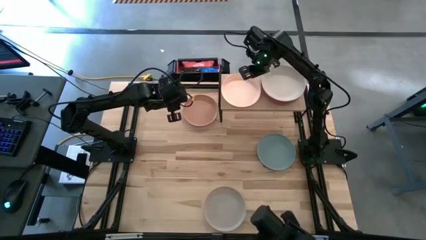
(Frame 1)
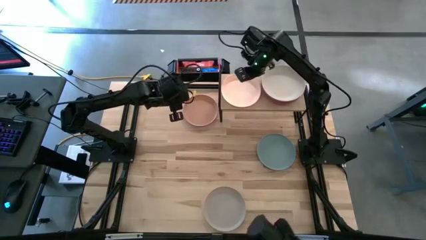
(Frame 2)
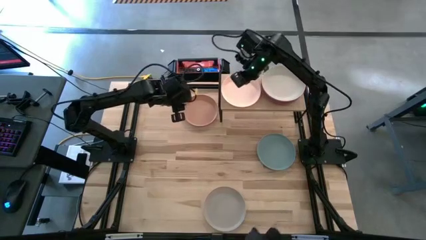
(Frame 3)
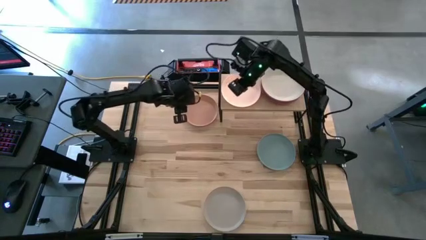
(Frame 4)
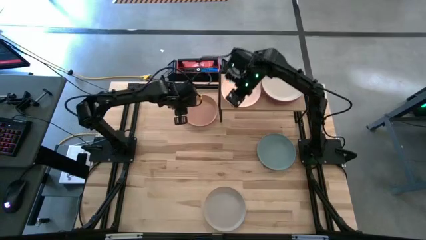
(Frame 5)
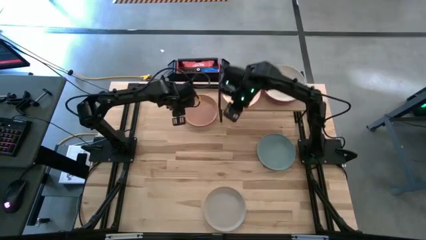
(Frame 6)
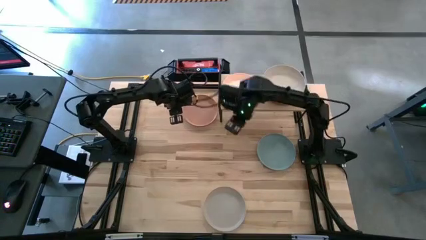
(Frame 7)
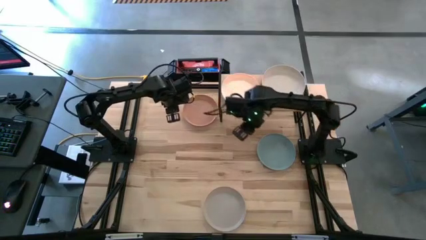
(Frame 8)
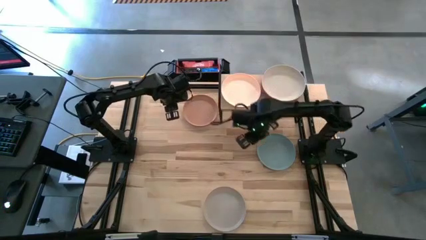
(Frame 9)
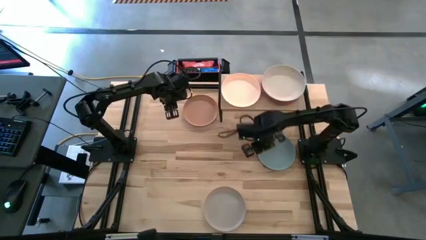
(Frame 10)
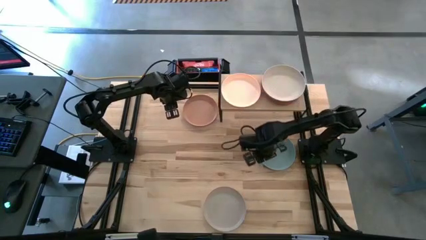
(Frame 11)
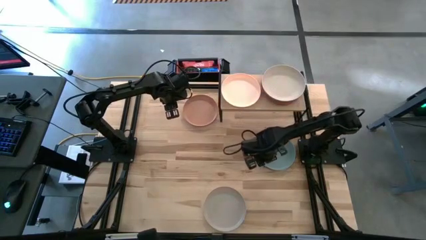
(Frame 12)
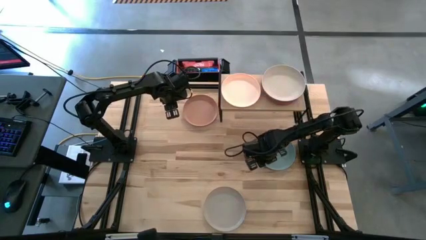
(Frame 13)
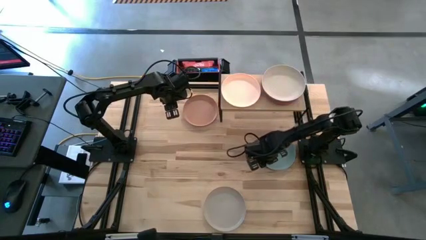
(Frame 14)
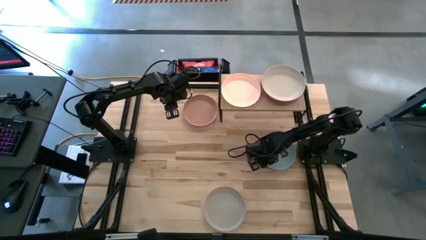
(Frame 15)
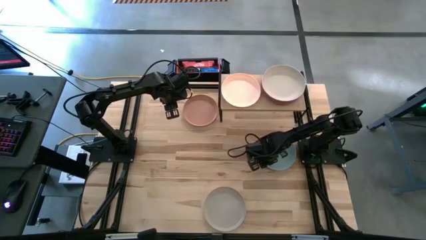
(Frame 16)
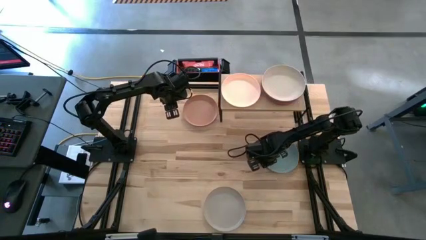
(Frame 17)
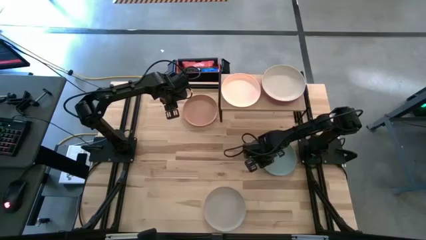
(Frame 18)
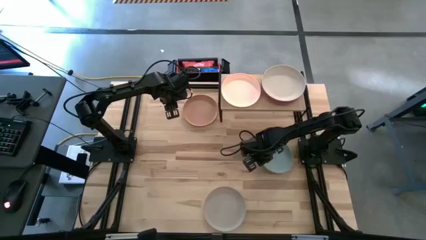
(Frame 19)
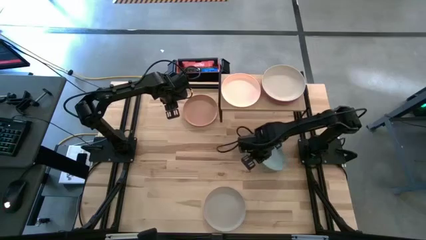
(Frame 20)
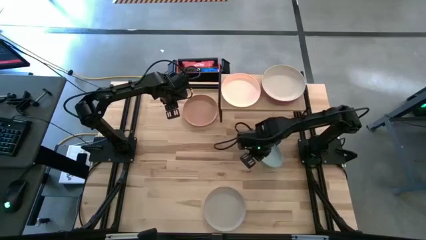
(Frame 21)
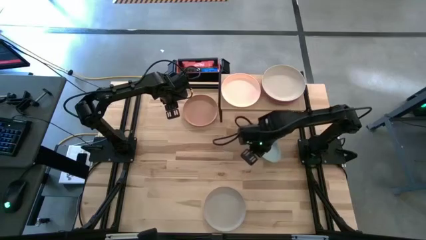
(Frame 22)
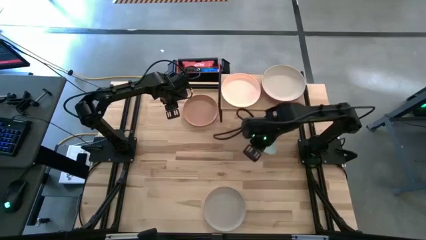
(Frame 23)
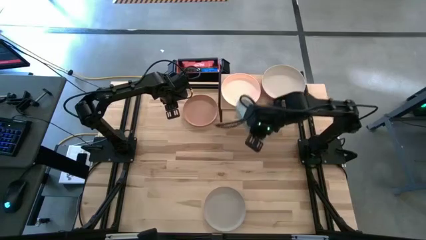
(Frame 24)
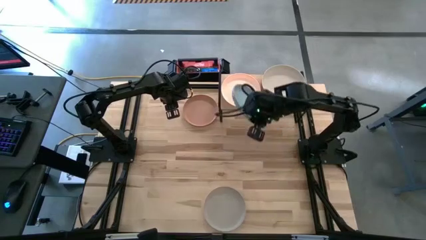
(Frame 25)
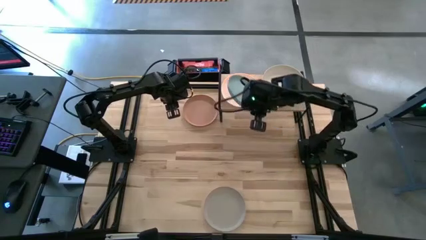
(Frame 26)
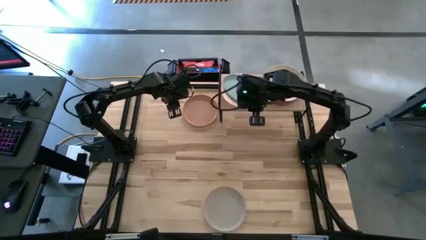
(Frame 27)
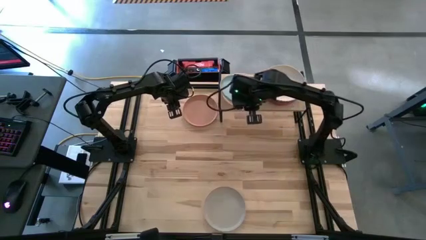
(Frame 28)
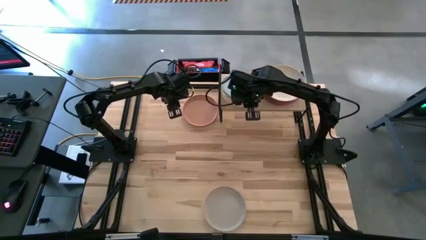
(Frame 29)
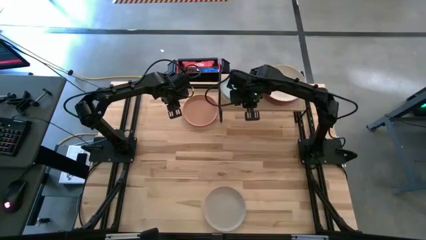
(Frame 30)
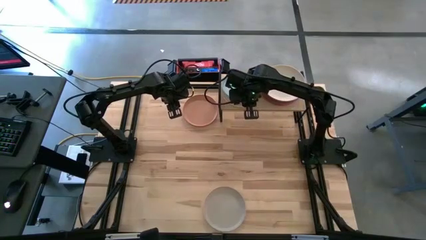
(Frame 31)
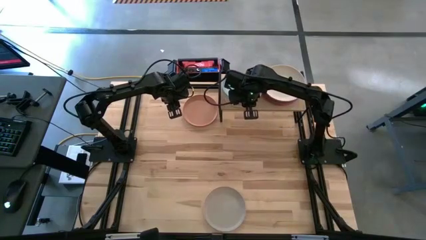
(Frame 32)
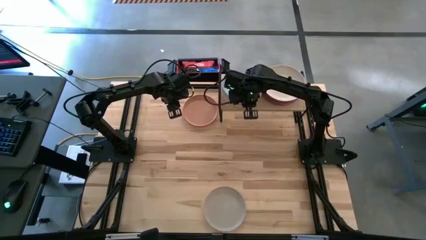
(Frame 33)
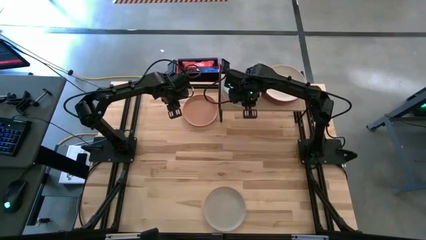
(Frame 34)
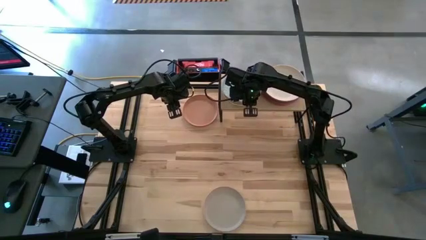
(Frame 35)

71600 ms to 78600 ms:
Task: Place and stack plates onto a shelf
Stack the blue plate on top of the light orange plate on the shelf

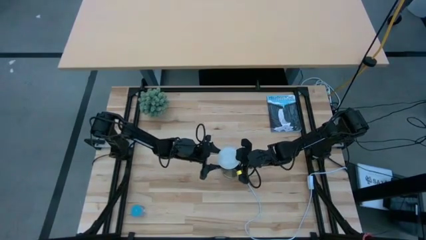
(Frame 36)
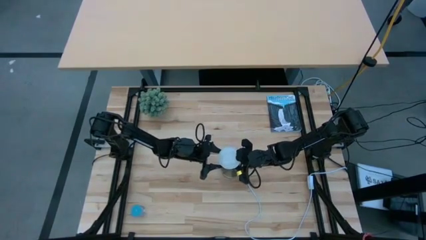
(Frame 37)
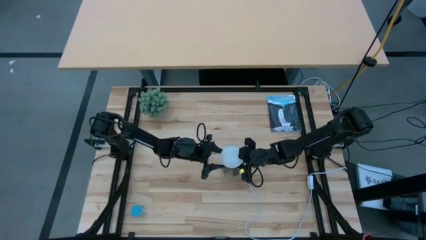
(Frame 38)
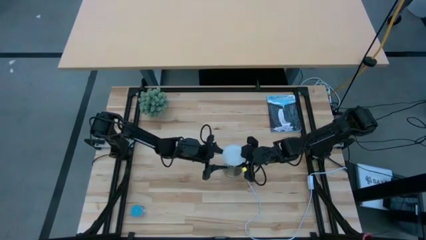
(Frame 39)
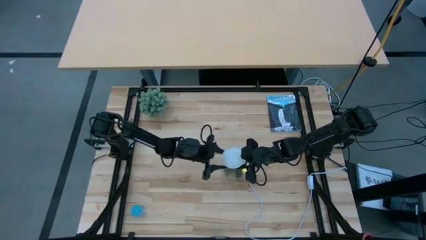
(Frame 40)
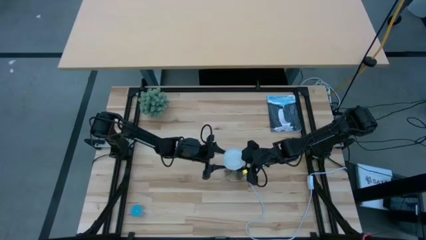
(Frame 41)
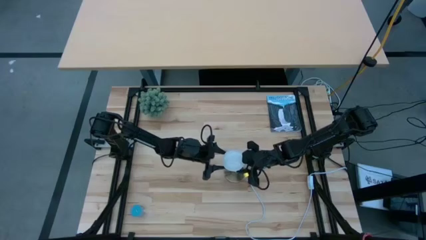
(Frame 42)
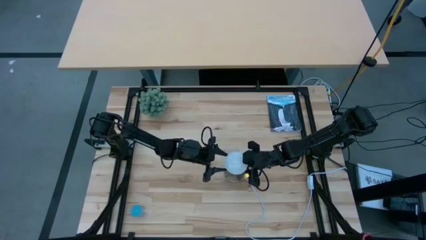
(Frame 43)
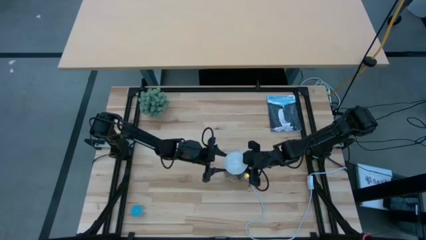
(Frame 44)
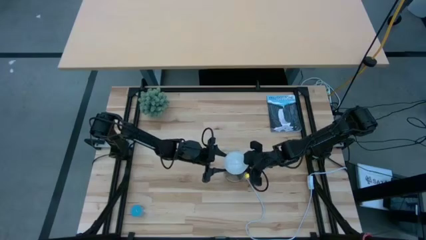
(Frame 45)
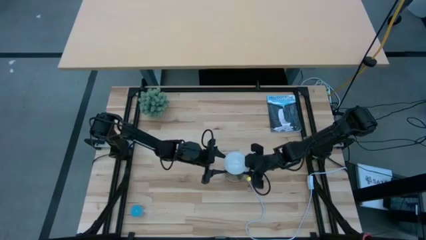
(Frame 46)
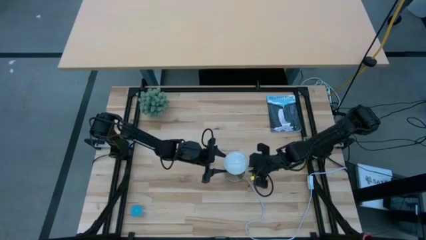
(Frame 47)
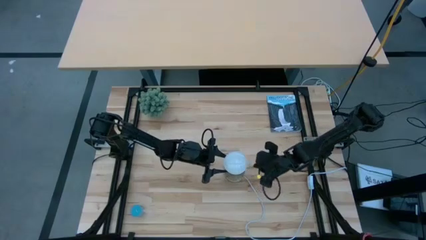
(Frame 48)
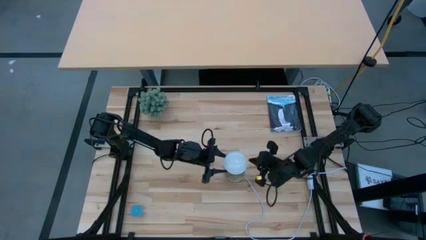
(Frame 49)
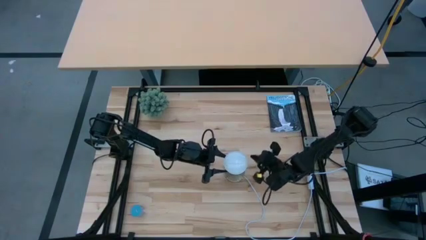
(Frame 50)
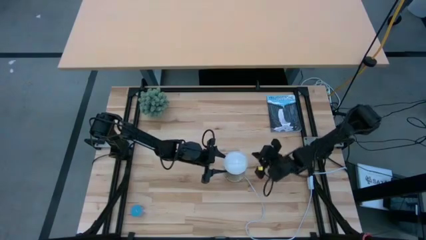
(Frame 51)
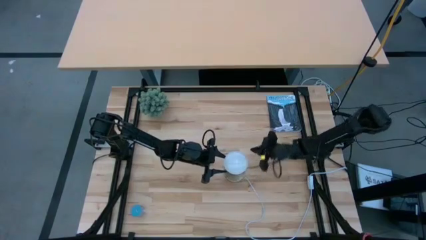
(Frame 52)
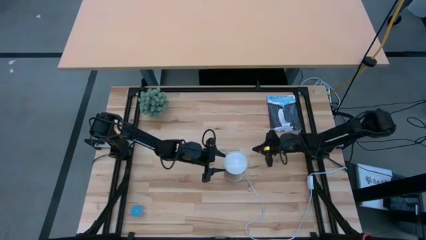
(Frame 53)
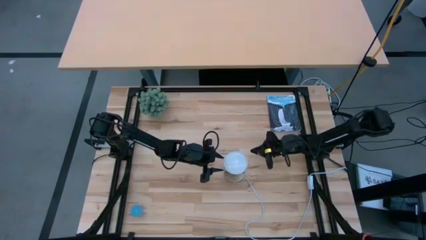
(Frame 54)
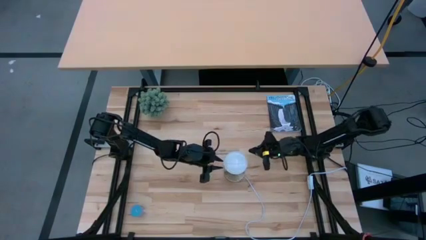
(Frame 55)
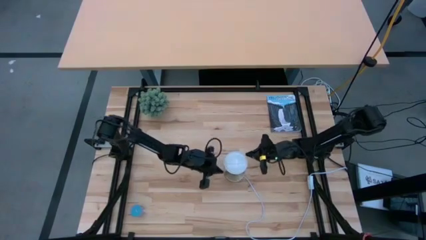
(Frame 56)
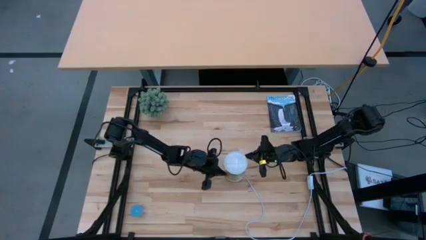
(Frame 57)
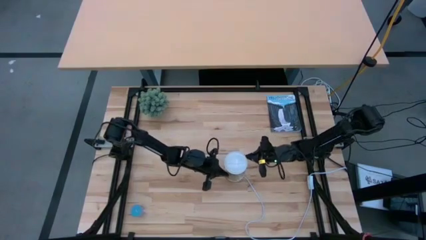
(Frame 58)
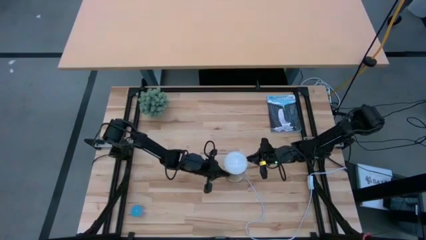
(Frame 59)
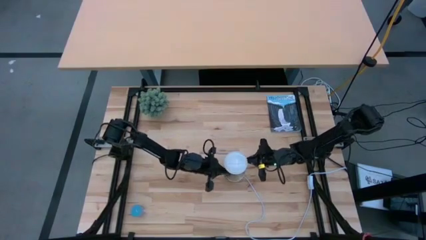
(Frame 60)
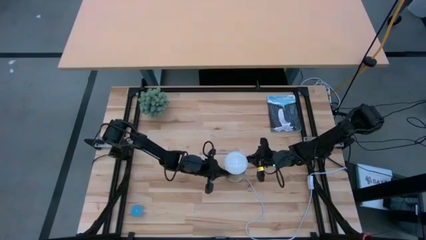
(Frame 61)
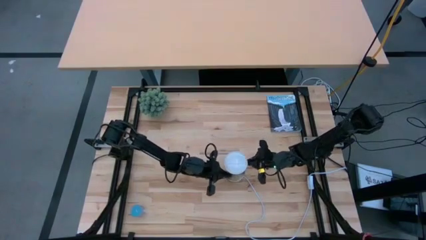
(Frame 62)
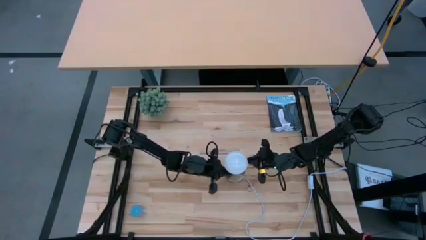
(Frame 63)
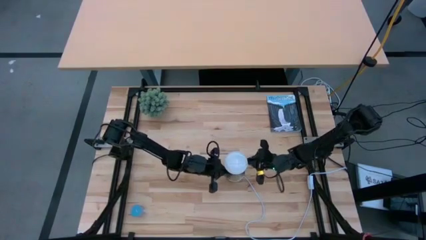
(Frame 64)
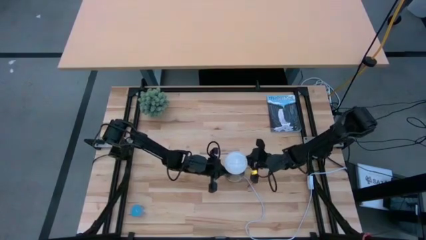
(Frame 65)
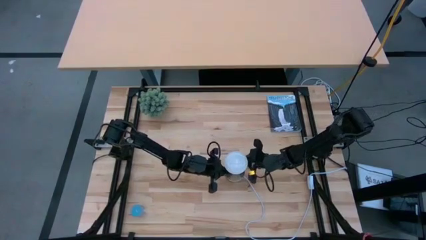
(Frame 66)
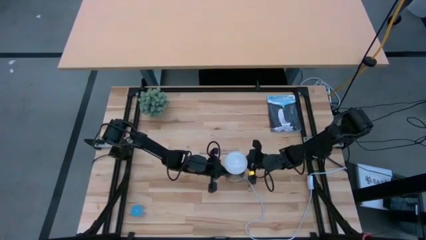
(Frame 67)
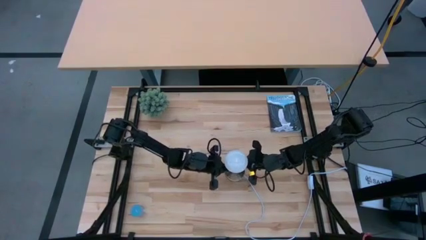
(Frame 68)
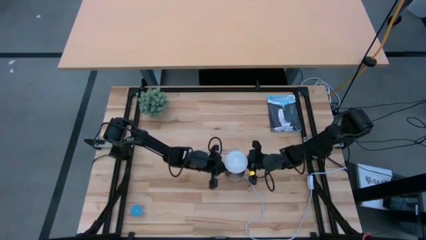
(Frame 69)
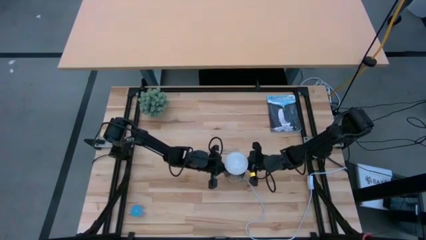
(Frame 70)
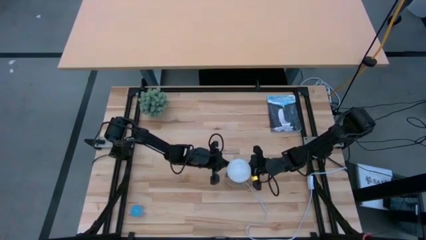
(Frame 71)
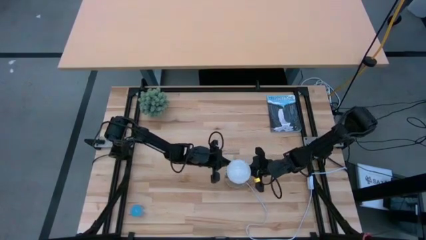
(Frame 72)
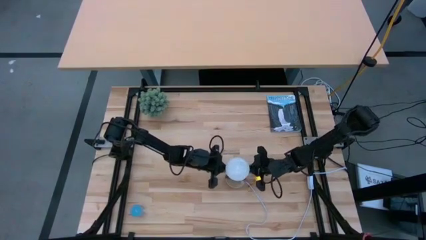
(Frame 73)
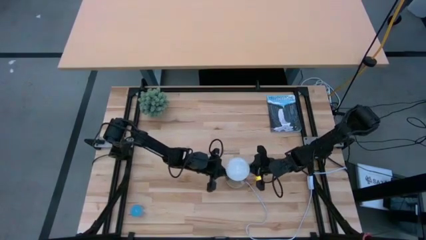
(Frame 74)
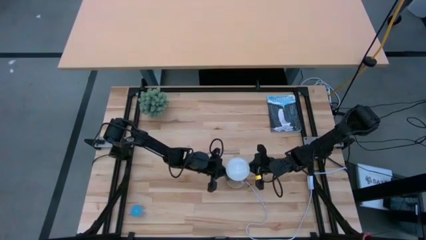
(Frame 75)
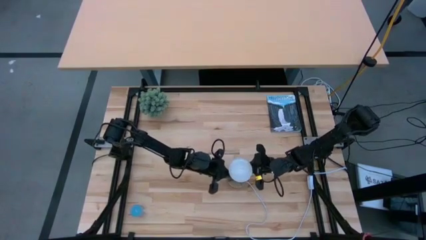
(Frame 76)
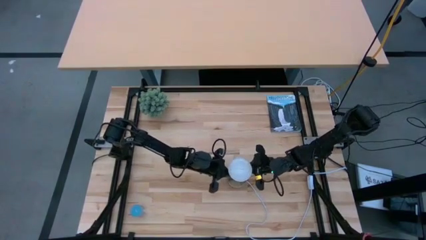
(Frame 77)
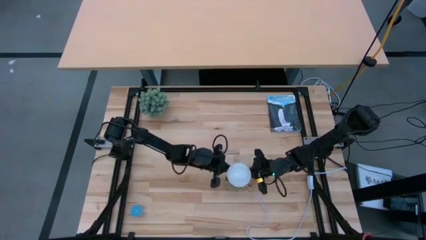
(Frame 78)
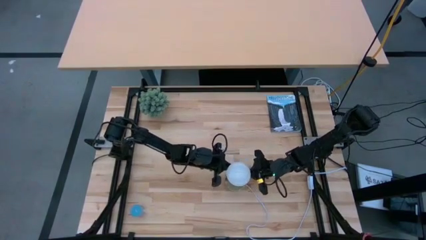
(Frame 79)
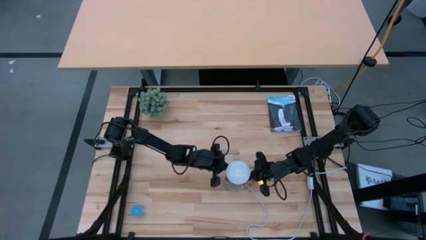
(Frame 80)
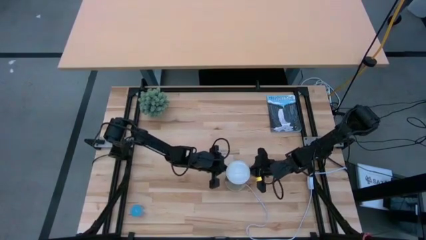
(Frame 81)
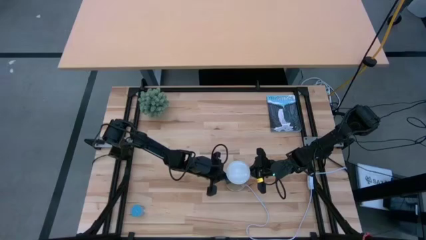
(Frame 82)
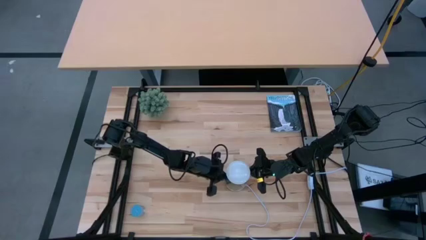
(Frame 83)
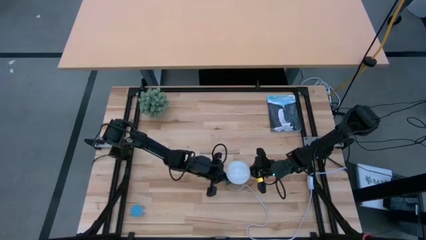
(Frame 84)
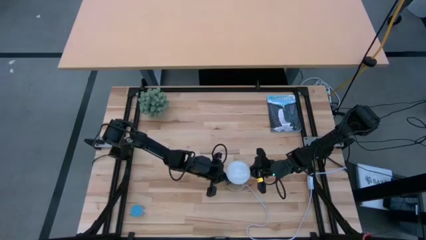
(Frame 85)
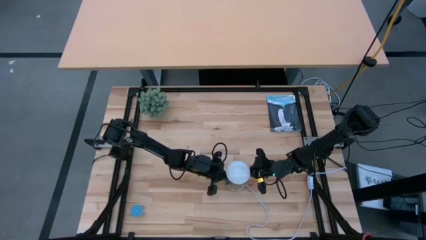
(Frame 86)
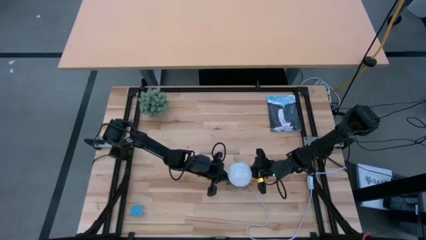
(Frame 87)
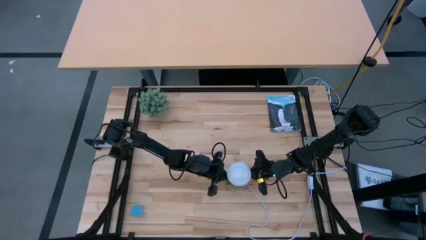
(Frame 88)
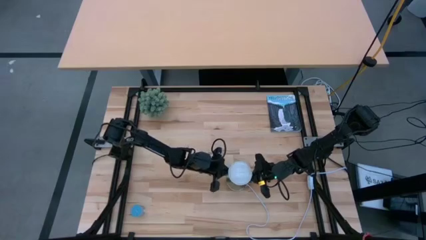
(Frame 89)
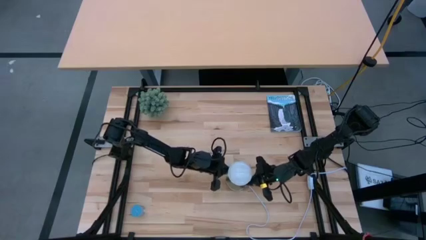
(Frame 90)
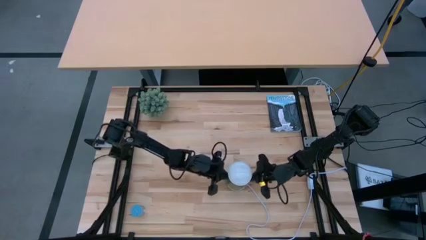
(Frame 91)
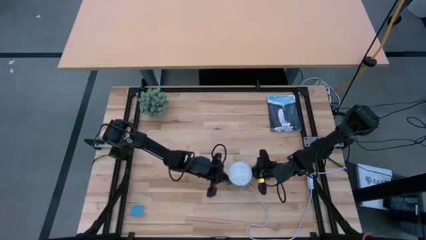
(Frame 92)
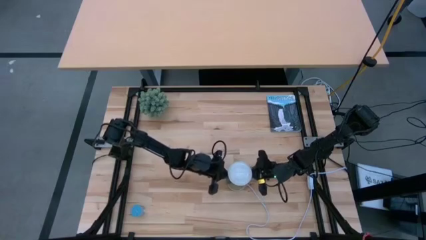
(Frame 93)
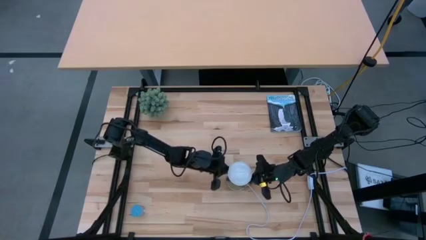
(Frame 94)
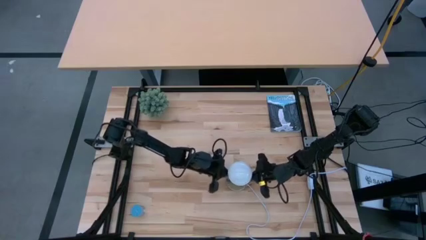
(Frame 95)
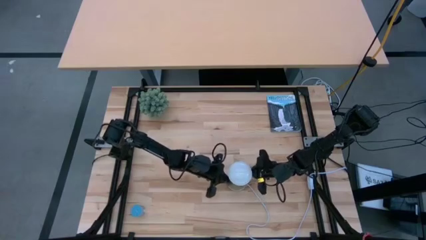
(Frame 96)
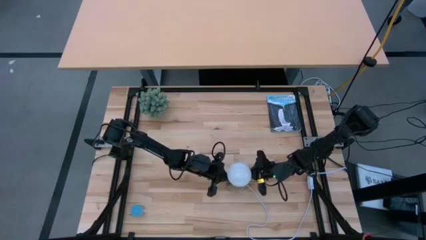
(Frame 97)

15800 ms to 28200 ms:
Task: Screw lightbulb
Insert the lightbulb into the lamp
